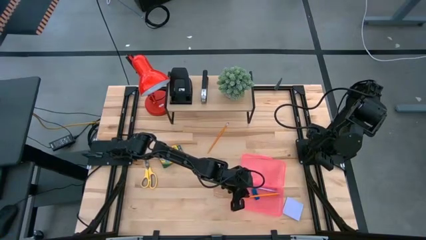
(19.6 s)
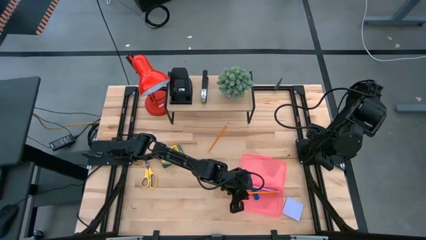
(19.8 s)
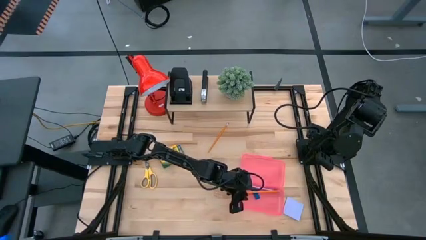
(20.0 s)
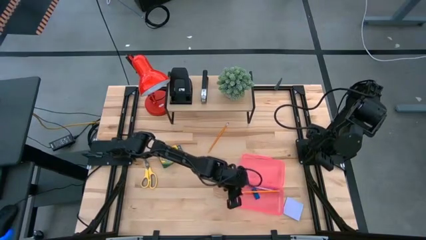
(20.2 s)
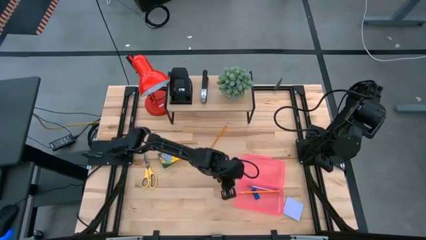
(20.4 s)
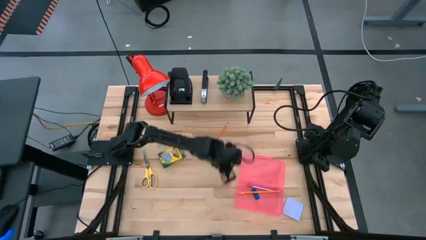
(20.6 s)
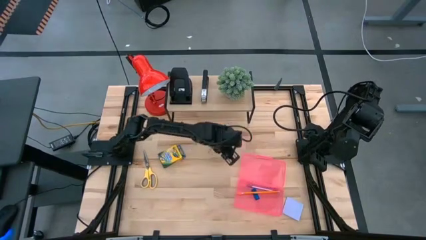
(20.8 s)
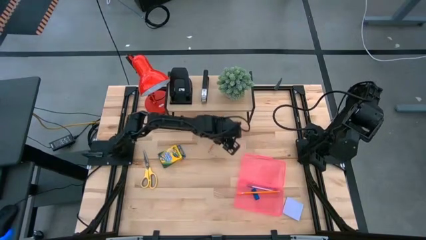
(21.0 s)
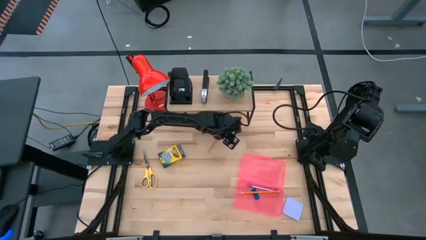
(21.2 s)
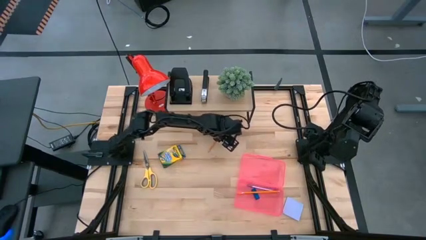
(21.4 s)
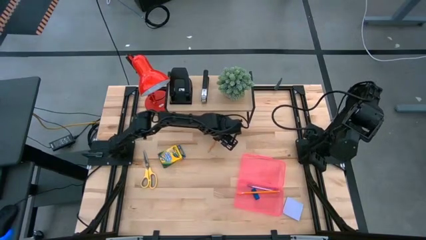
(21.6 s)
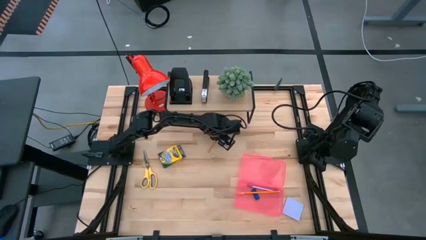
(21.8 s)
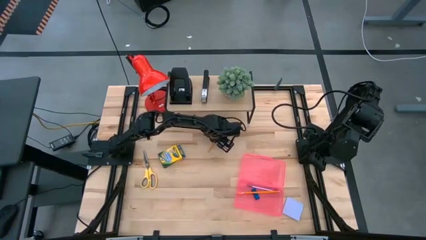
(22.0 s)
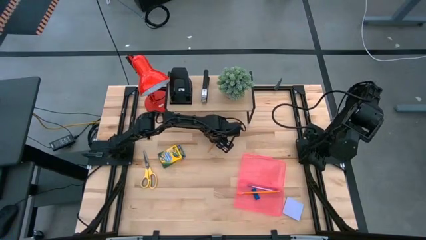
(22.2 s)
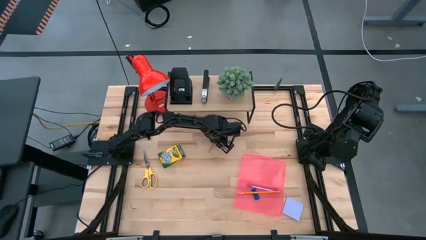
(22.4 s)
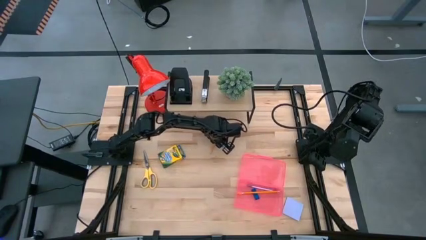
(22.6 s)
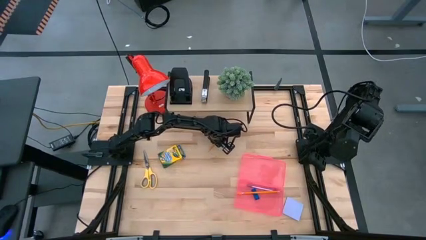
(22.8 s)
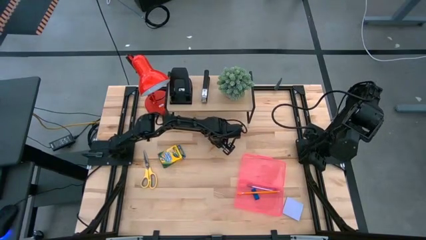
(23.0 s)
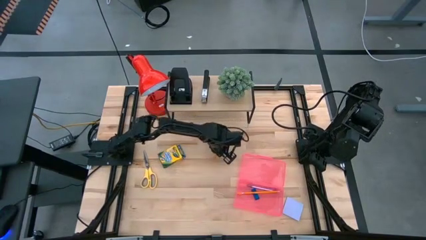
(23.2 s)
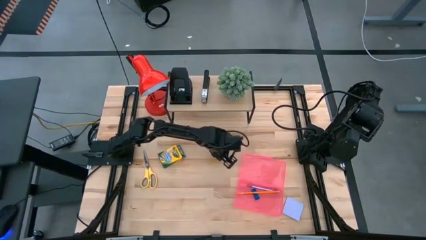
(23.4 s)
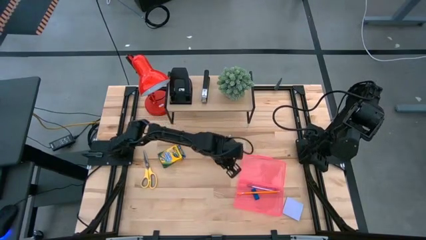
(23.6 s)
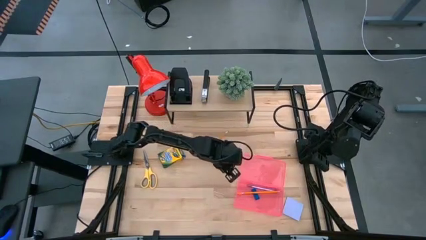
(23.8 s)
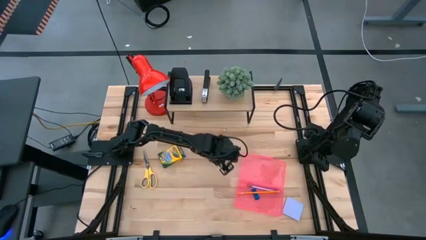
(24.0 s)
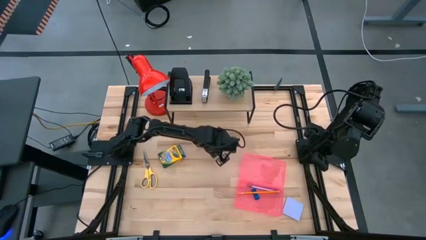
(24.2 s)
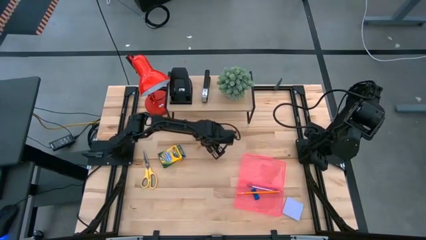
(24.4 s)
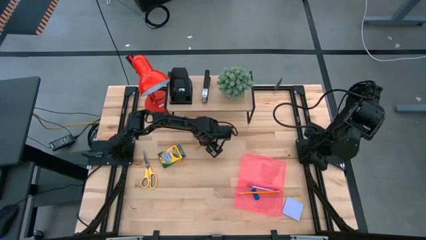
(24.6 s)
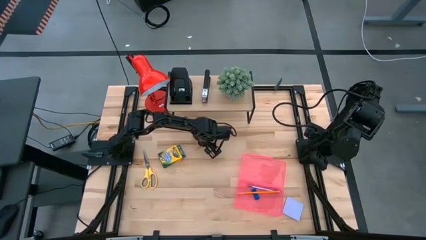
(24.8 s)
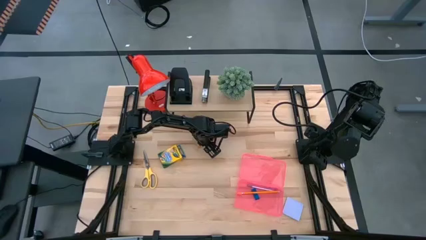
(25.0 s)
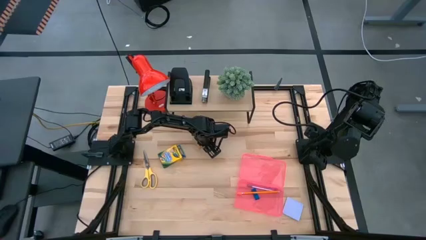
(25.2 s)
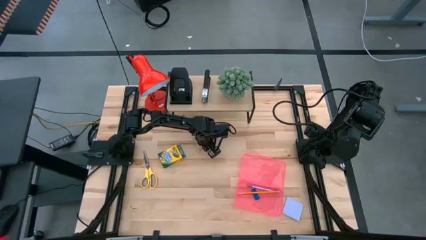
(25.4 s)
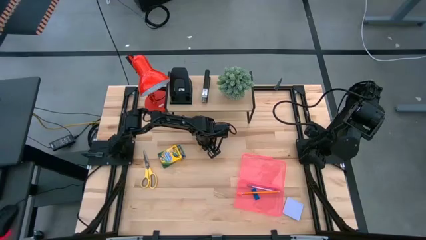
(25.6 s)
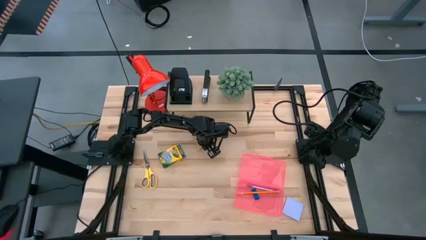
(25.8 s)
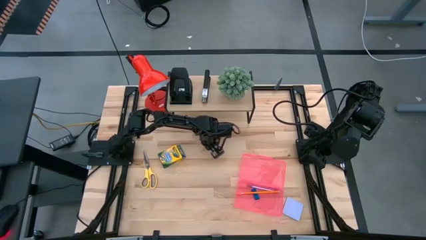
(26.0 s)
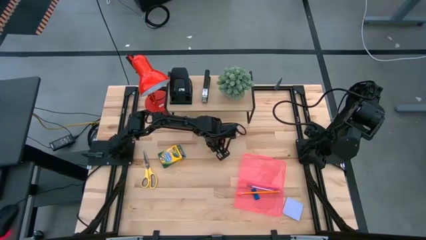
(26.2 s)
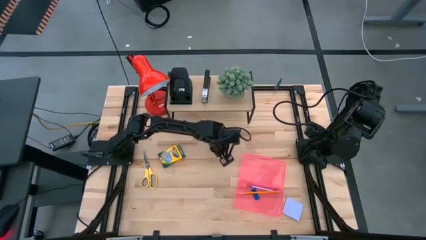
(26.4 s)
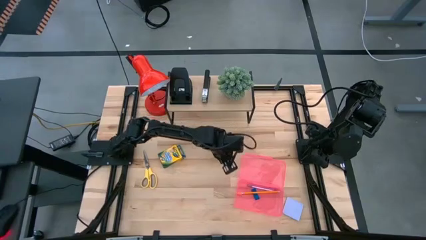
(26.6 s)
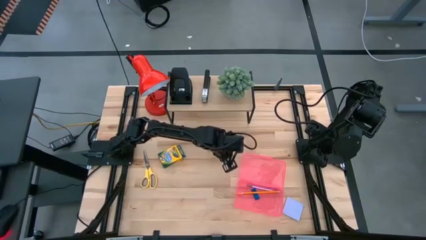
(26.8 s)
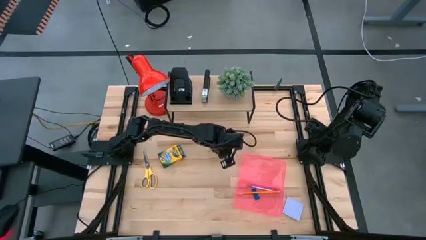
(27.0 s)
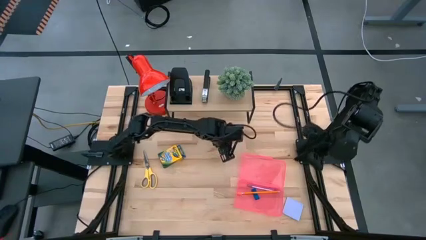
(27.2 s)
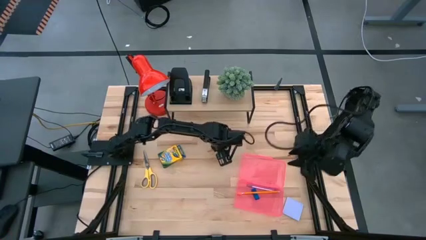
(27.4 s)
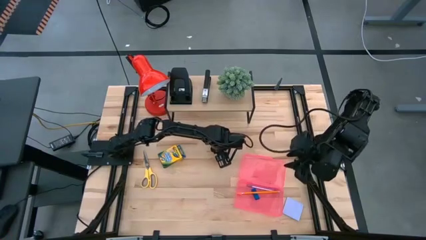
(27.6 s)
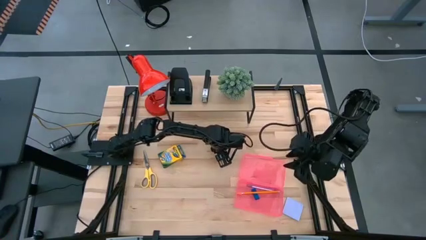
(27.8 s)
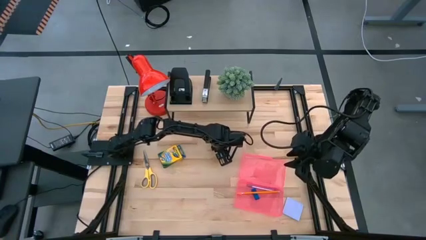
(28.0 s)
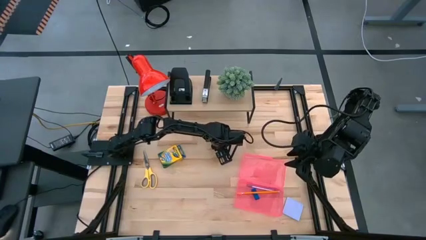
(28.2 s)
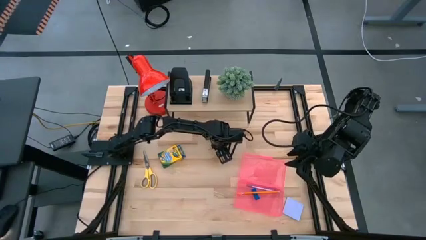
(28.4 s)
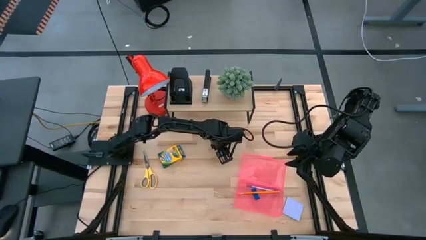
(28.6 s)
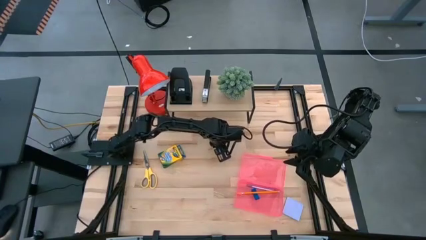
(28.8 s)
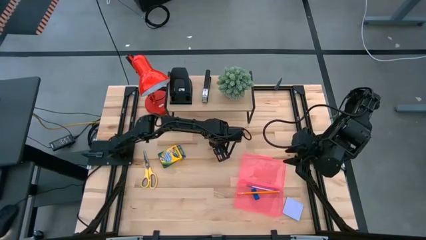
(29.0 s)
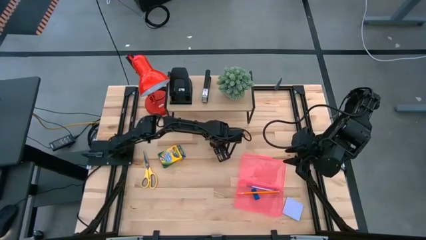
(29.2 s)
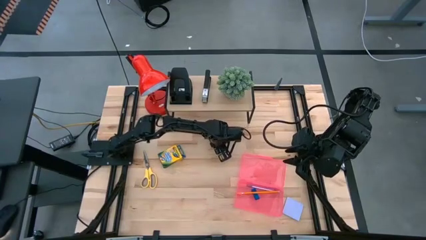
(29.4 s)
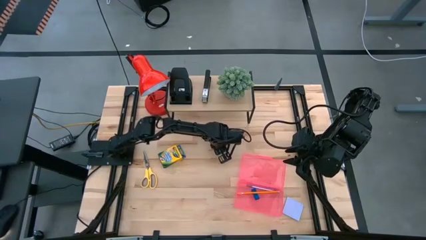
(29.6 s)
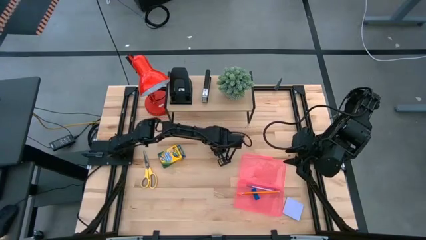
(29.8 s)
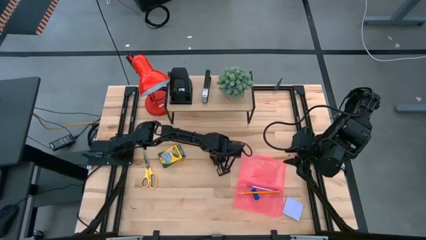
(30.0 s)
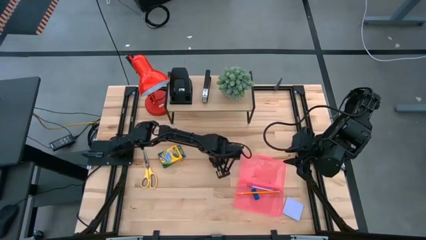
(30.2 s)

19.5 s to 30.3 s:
Task: Pack school essentials
Put the orange pencil into the pink supply box

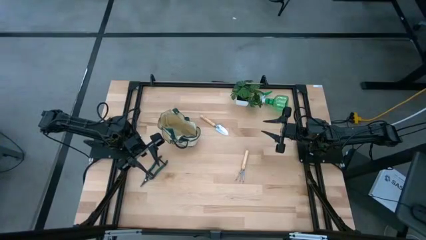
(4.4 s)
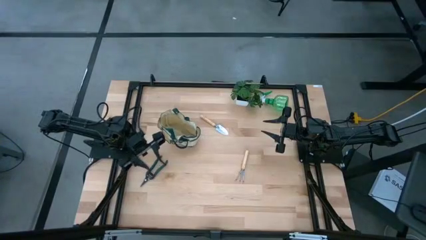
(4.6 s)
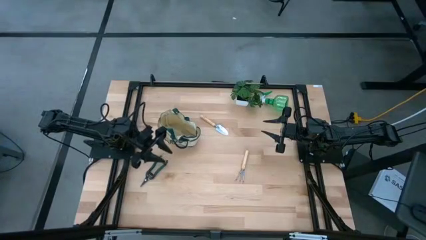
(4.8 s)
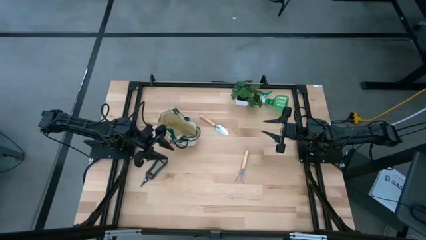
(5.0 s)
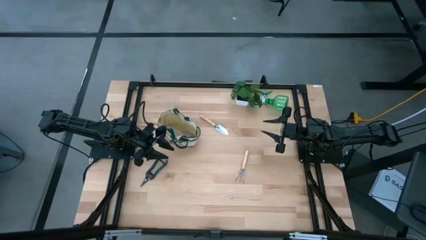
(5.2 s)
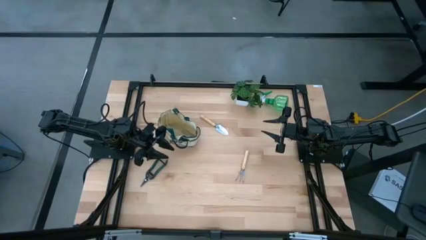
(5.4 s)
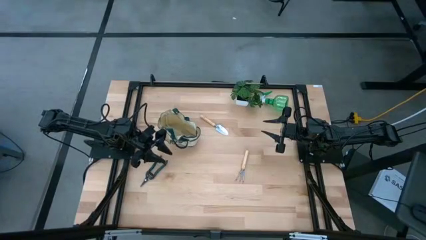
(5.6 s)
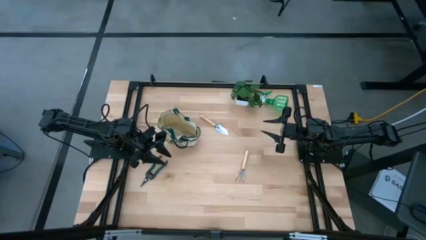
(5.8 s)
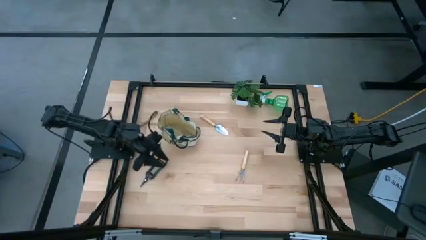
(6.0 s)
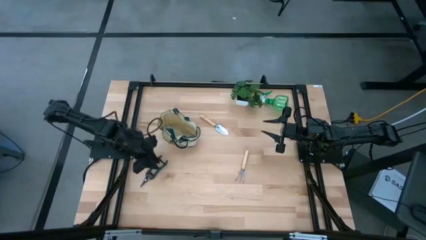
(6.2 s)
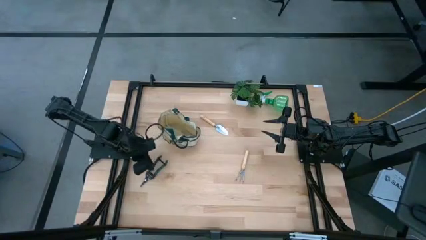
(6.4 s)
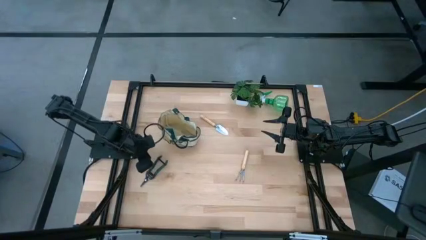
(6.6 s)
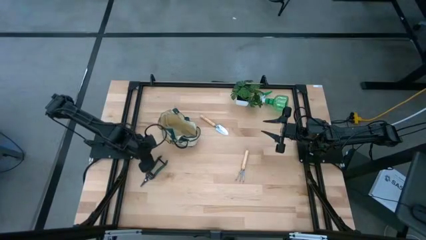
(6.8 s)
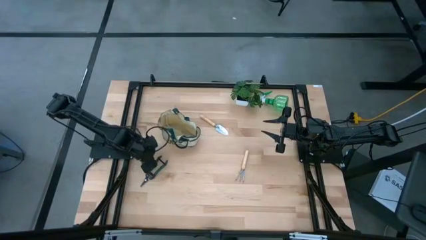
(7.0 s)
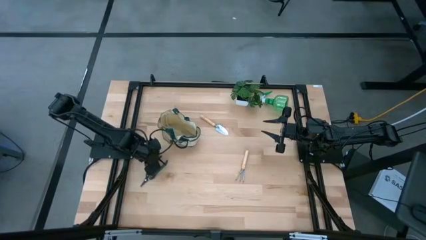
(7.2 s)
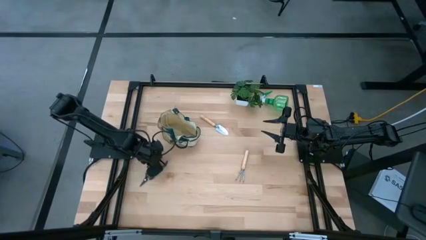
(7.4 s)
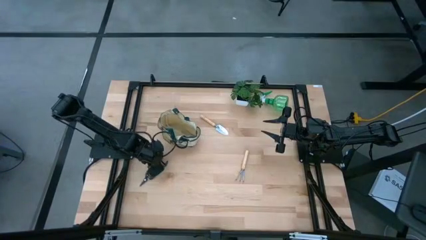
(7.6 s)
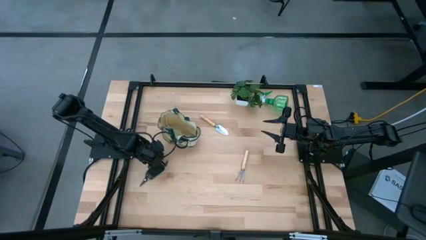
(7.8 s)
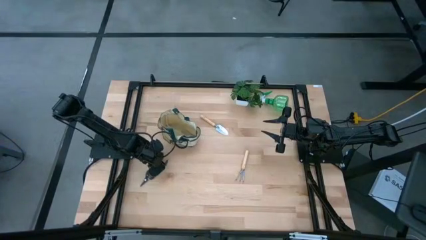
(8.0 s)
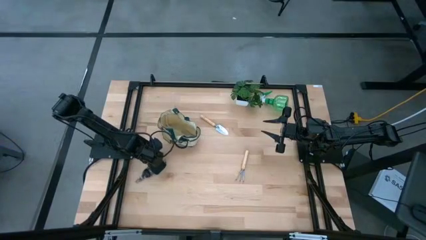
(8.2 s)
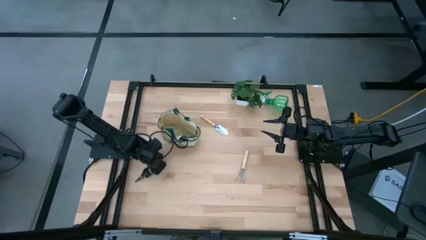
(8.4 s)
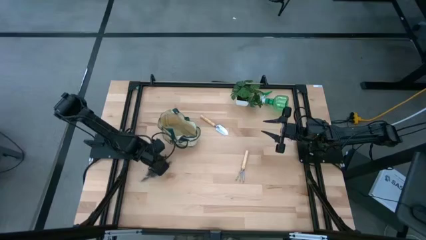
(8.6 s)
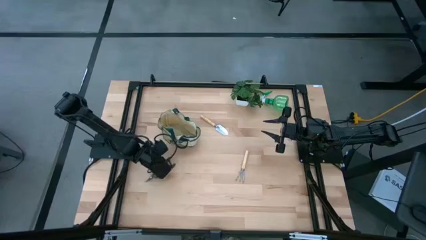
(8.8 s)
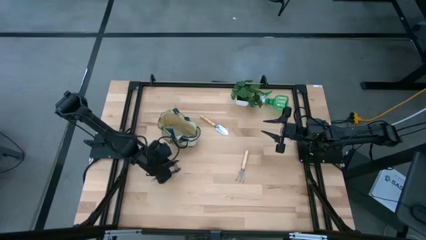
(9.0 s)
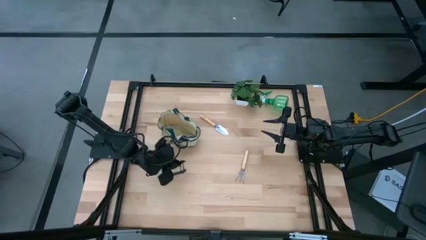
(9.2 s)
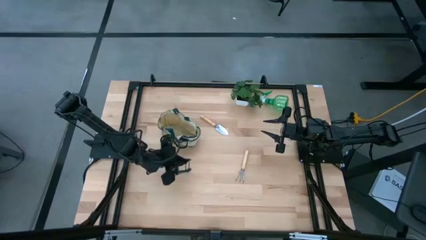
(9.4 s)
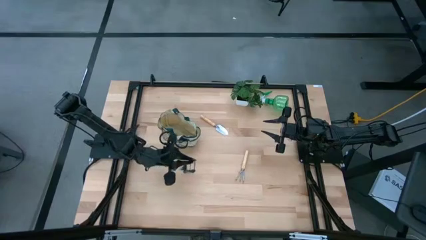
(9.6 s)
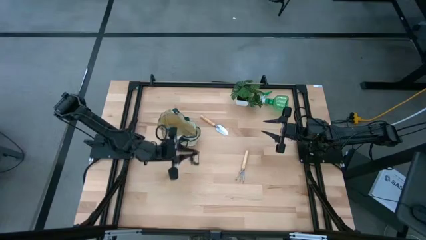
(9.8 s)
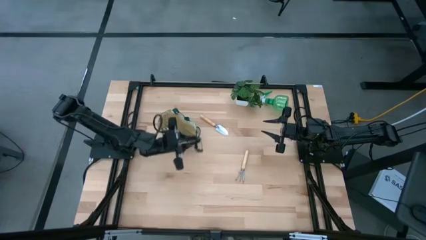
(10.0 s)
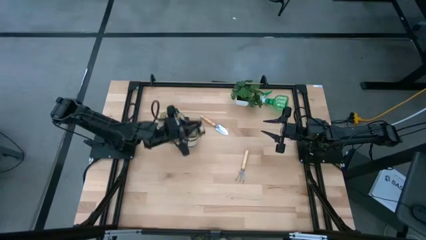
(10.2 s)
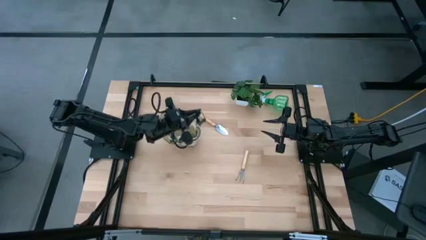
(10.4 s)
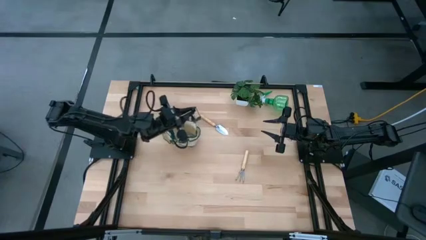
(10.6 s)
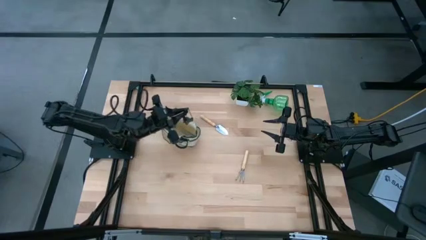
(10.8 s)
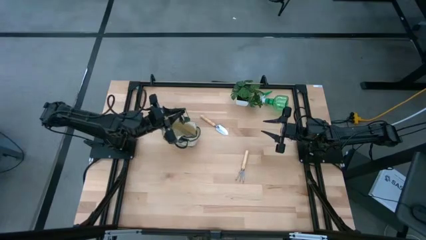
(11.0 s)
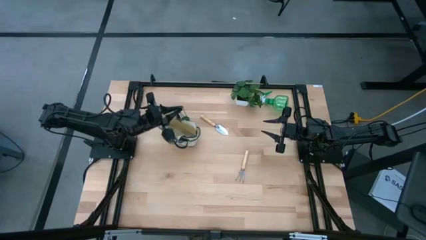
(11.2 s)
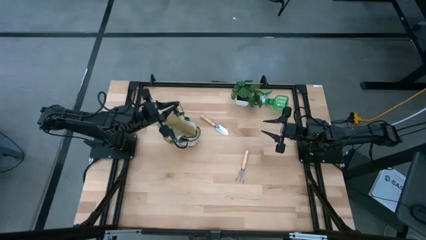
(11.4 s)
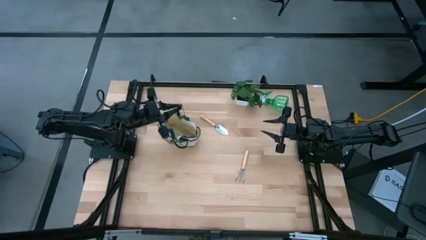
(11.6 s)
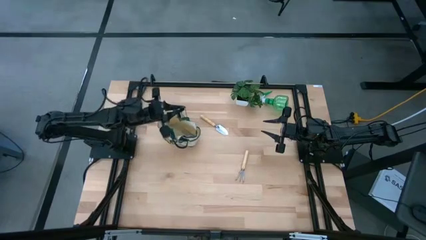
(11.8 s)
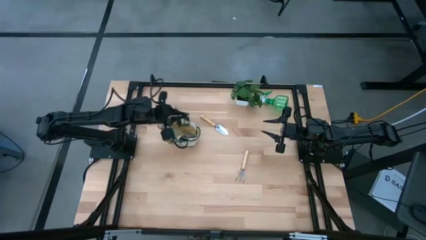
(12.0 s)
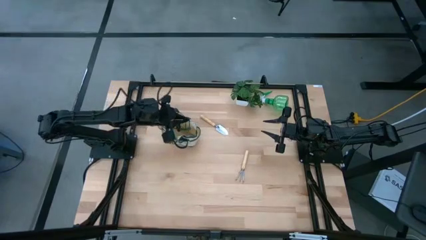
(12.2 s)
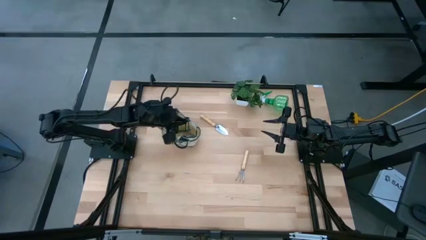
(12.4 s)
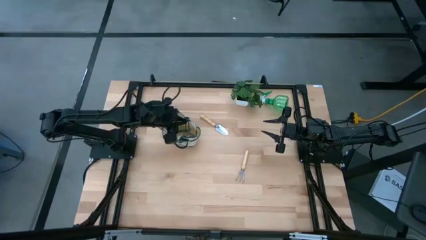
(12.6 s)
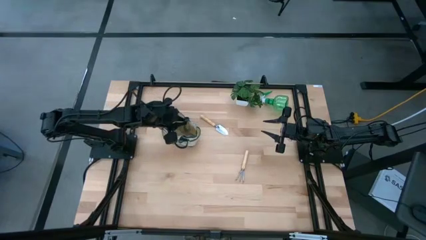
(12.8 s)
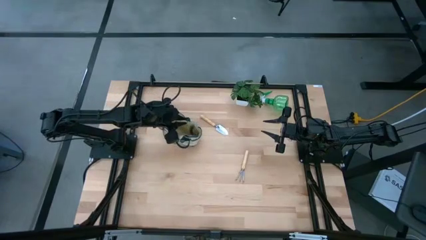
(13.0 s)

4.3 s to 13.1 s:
Task: Pick & Place Garden tools in Gardening bag
Put the green shears into the gardening bag
